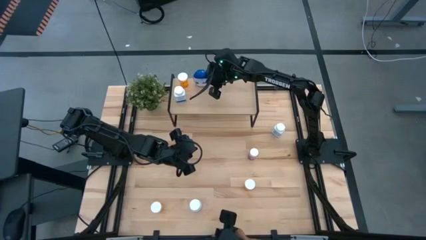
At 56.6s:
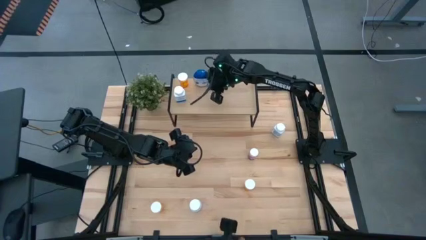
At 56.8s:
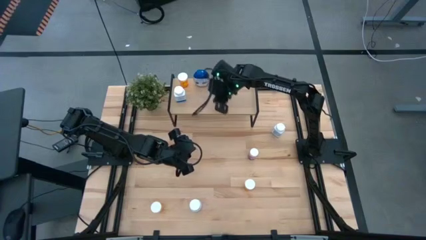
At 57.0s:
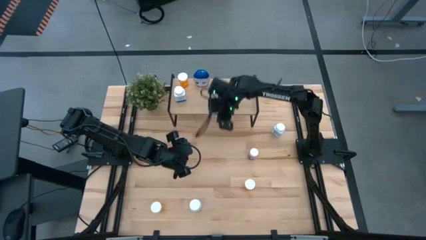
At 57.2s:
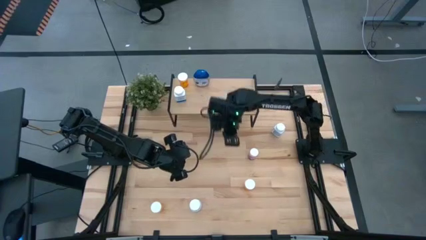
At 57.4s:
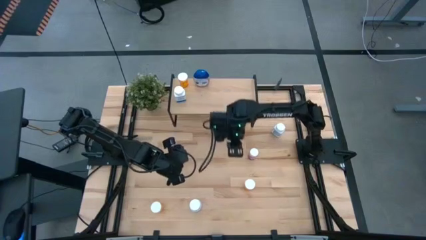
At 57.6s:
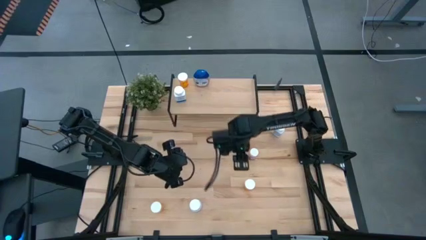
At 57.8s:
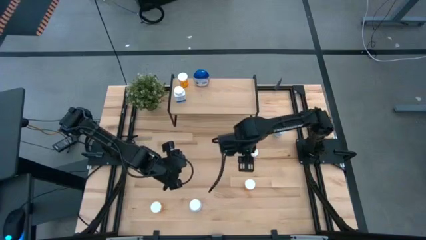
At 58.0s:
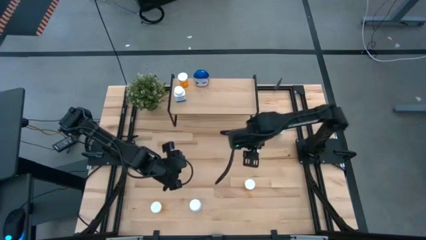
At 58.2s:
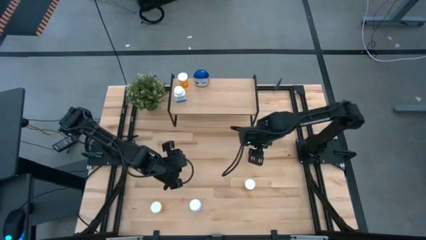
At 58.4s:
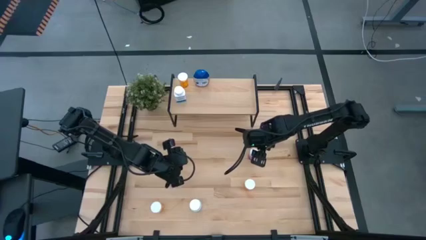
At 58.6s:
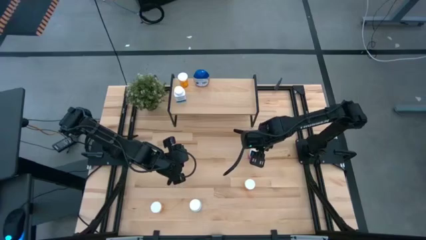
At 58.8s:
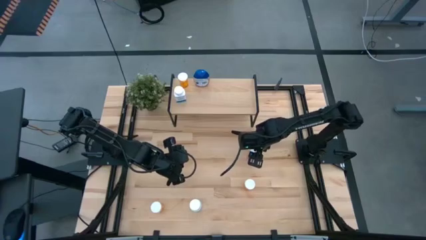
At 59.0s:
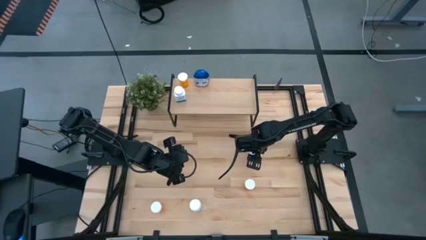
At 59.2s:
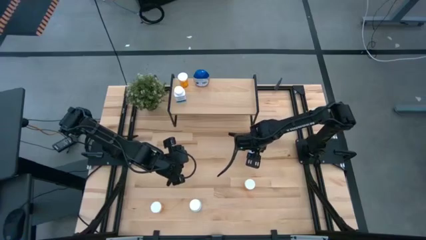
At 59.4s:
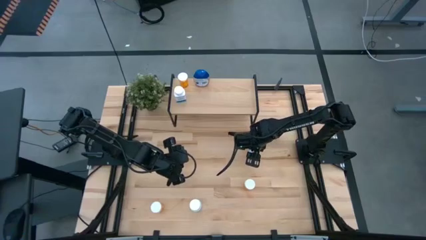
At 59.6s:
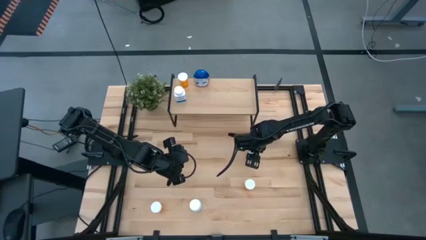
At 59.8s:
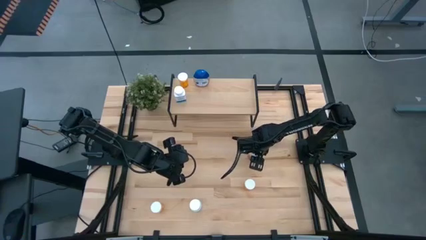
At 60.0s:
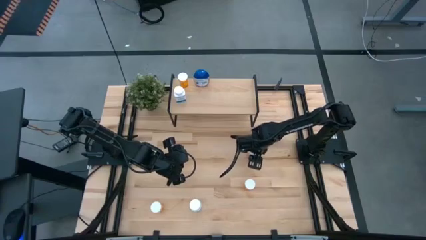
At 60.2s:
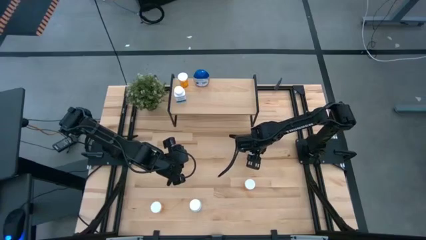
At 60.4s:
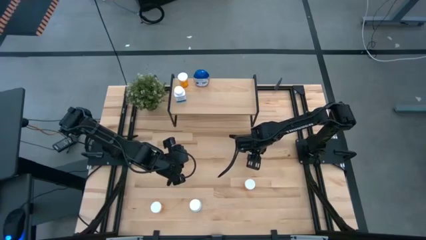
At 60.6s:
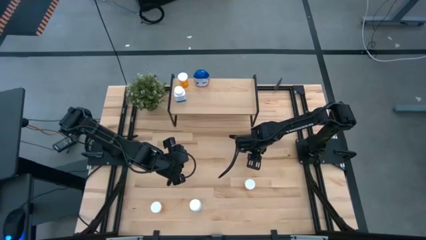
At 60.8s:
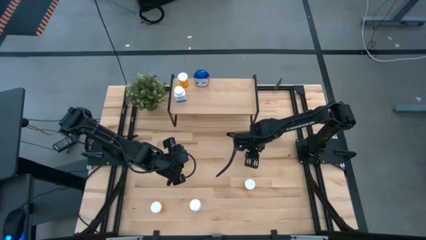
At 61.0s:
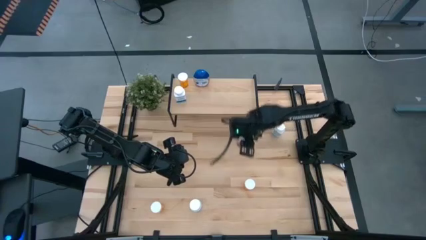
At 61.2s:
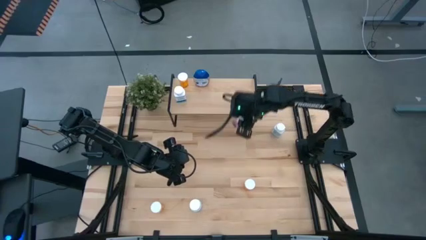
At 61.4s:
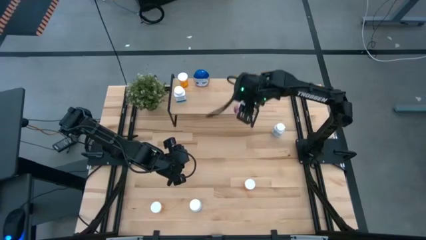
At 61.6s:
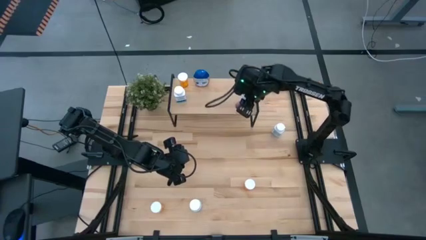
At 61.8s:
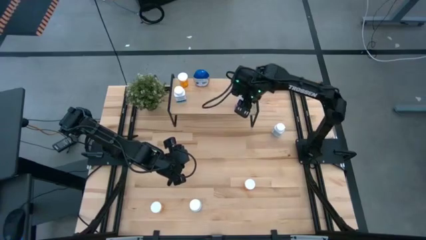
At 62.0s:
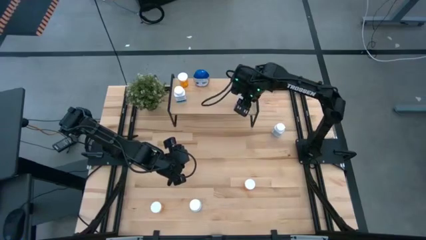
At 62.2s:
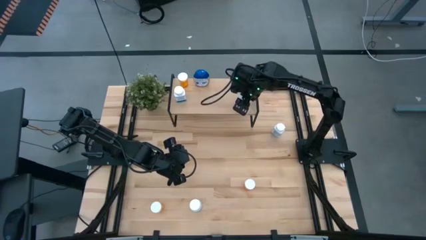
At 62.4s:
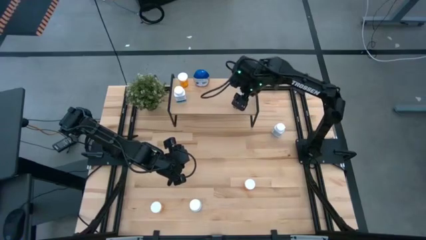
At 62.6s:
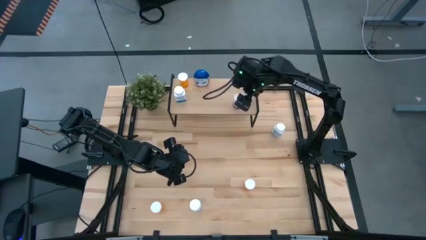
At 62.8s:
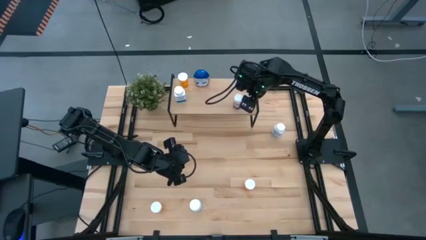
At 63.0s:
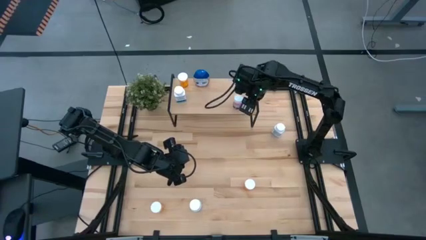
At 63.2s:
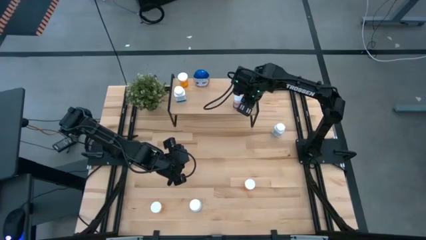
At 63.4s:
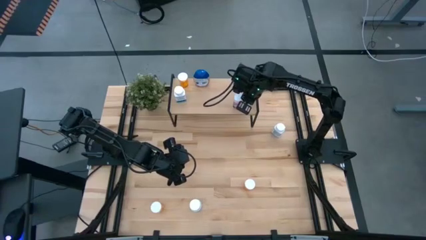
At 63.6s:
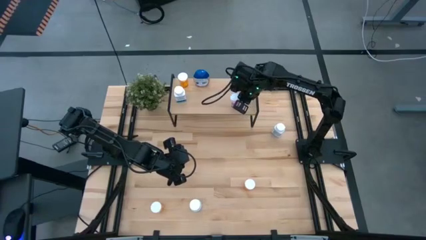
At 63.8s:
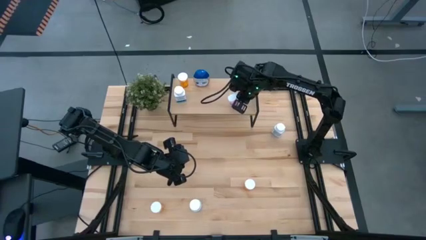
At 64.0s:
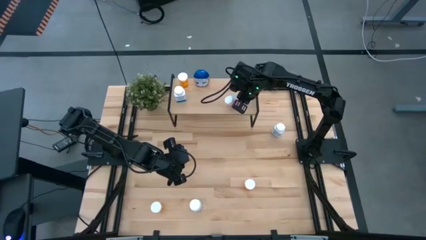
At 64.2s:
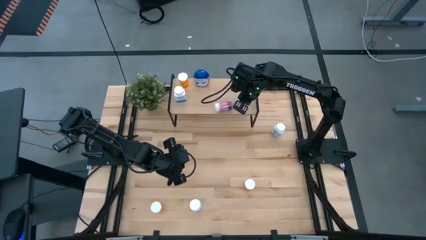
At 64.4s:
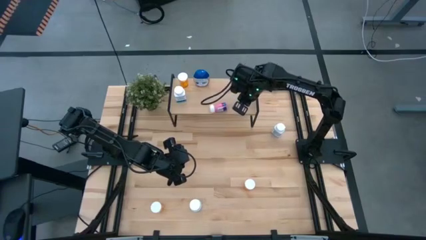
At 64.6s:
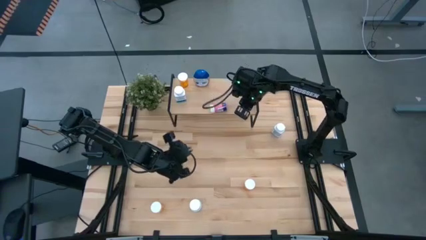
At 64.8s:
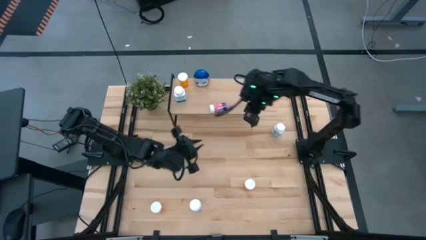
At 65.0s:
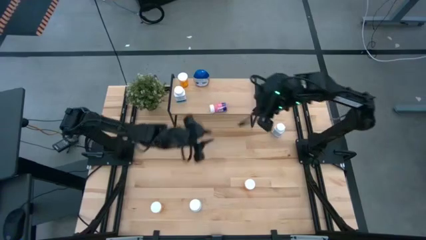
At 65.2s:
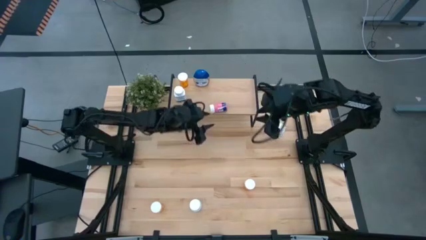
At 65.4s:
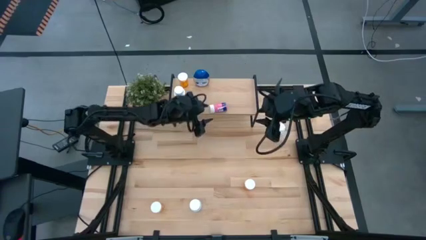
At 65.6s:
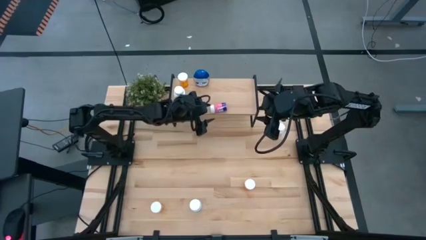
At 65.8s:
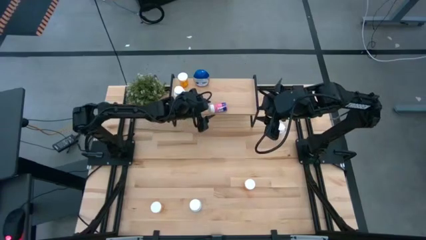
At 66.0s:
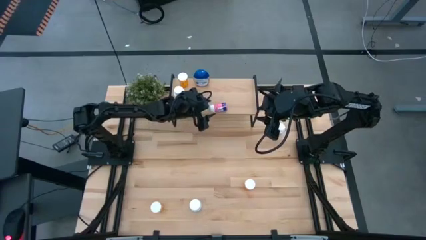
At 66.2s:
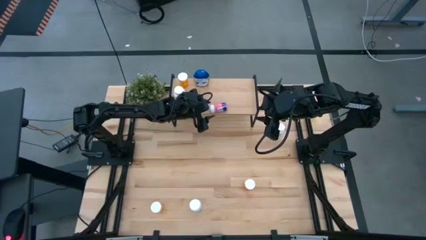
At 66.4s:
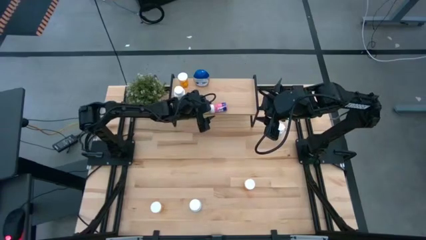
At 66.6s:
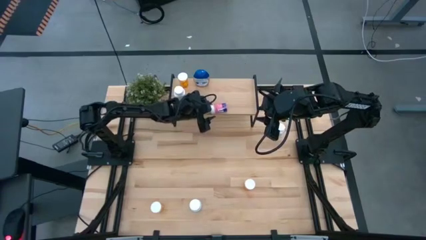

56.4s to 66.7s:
Task: Pick and place medicine bottles onto shelf by color
Put the pink bottle on the shelf

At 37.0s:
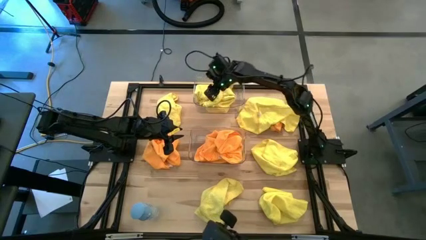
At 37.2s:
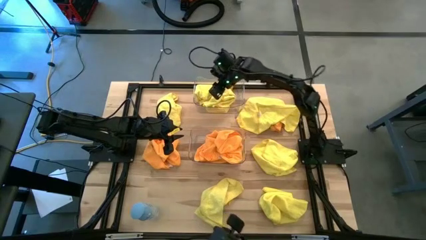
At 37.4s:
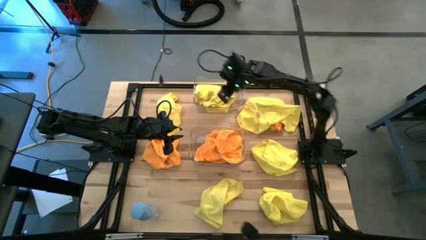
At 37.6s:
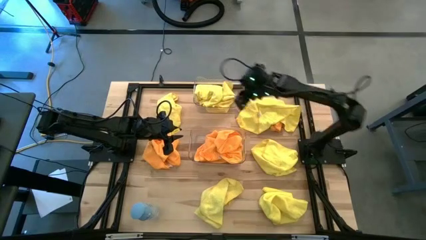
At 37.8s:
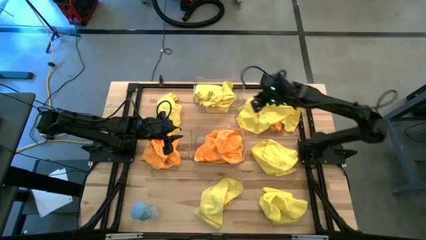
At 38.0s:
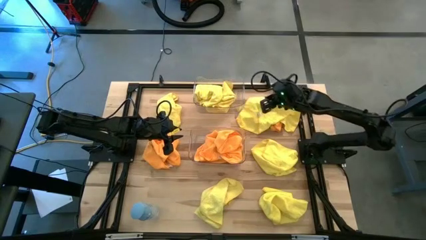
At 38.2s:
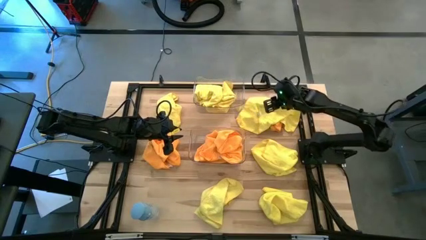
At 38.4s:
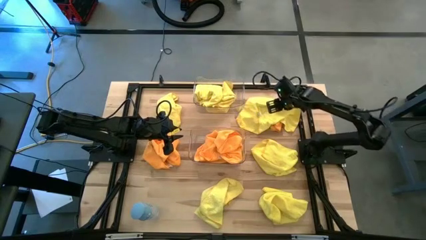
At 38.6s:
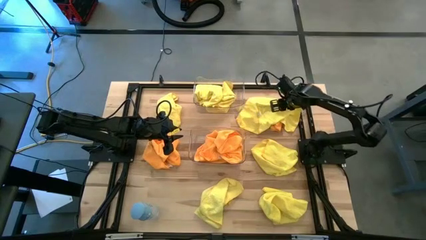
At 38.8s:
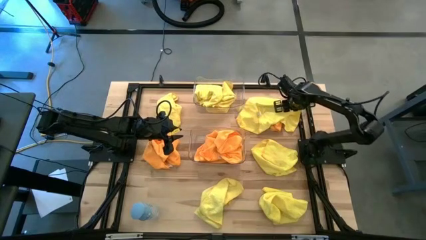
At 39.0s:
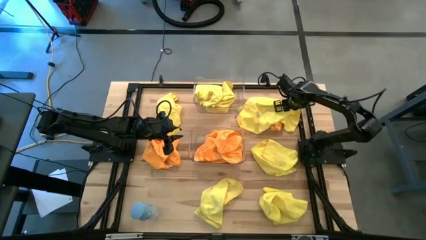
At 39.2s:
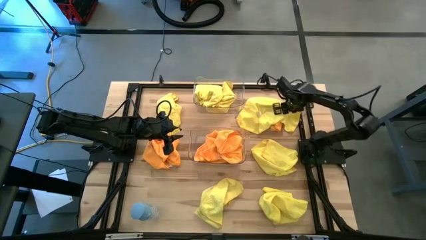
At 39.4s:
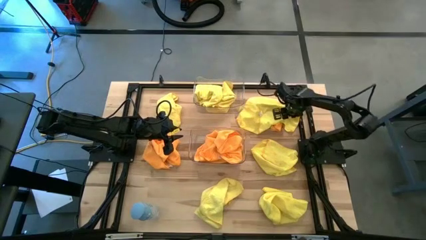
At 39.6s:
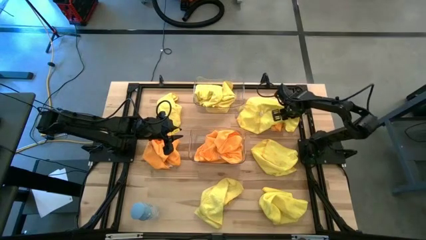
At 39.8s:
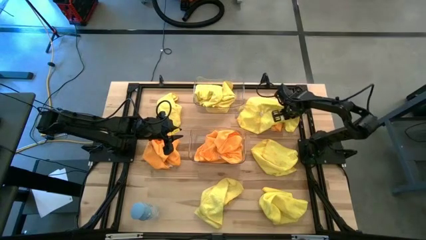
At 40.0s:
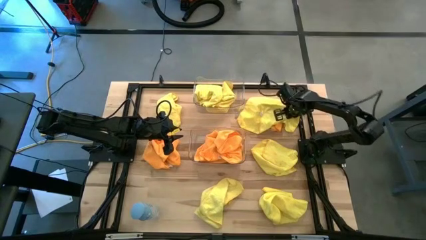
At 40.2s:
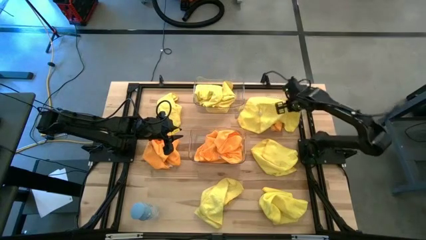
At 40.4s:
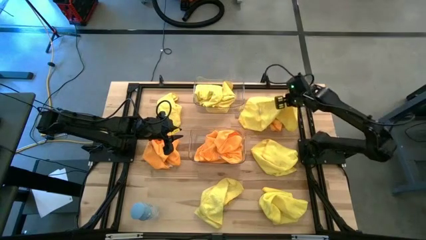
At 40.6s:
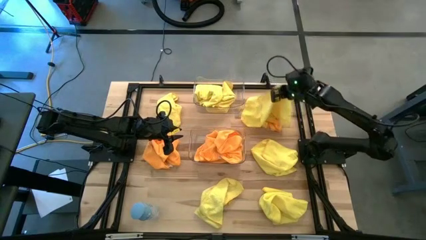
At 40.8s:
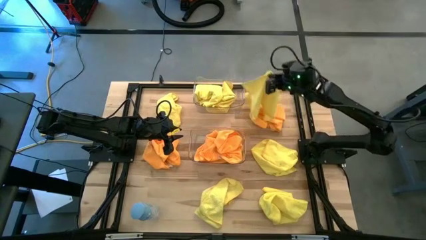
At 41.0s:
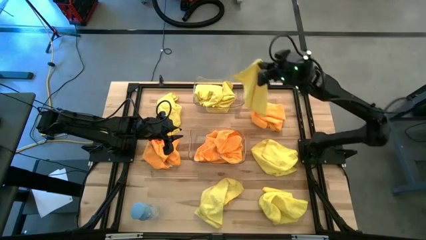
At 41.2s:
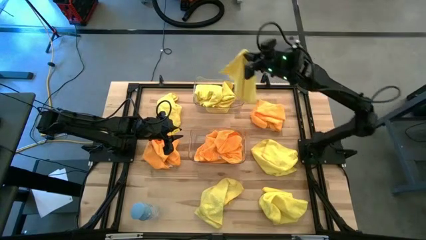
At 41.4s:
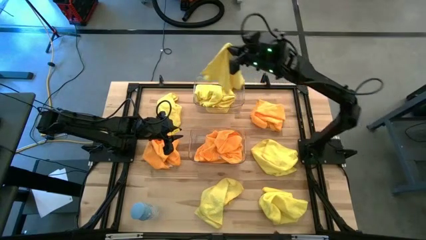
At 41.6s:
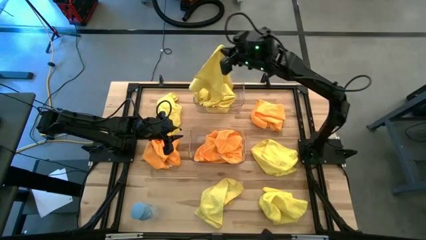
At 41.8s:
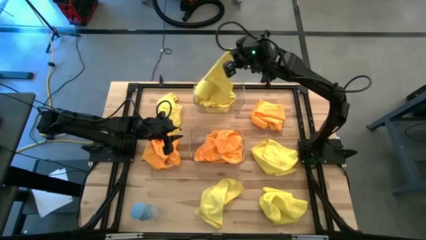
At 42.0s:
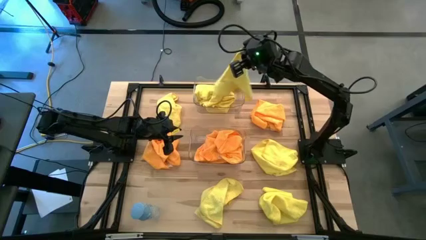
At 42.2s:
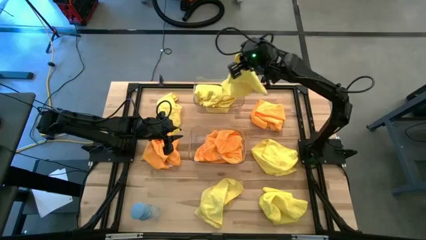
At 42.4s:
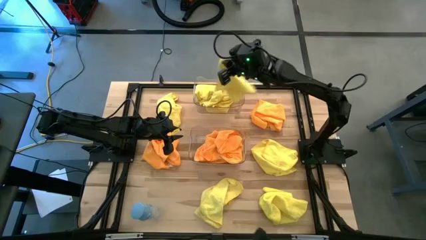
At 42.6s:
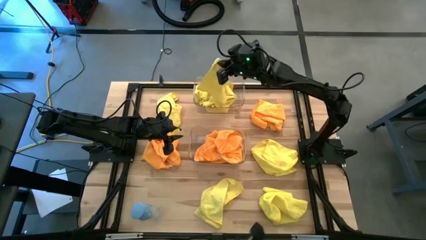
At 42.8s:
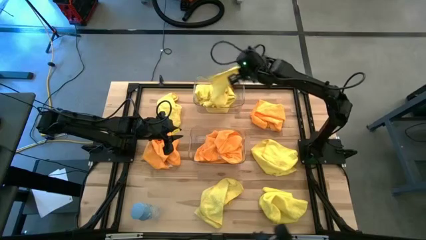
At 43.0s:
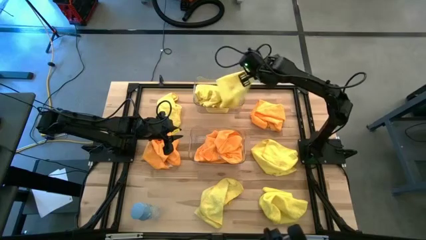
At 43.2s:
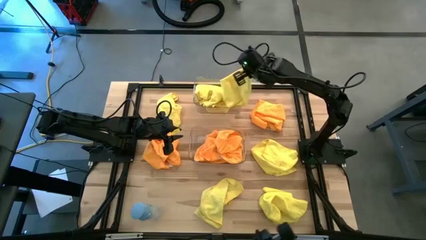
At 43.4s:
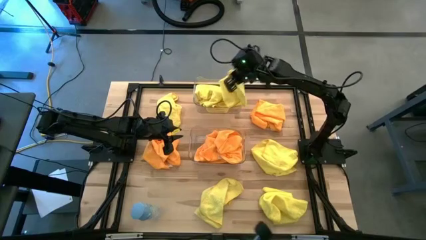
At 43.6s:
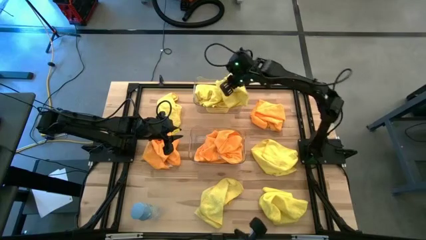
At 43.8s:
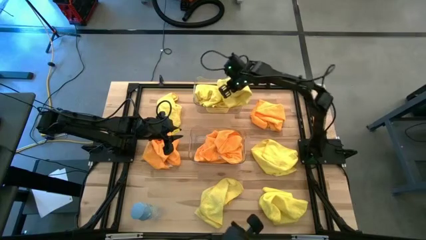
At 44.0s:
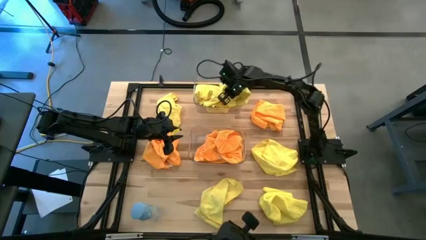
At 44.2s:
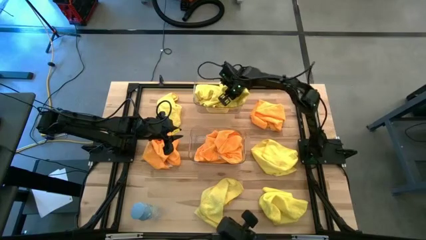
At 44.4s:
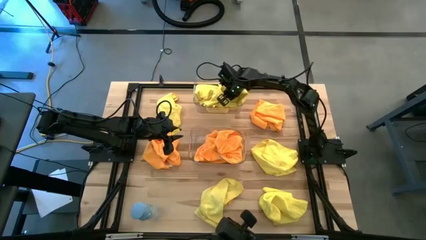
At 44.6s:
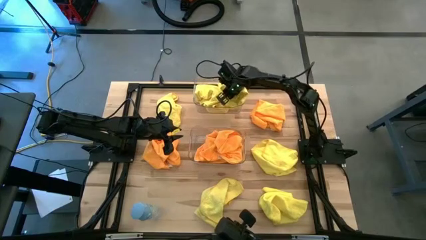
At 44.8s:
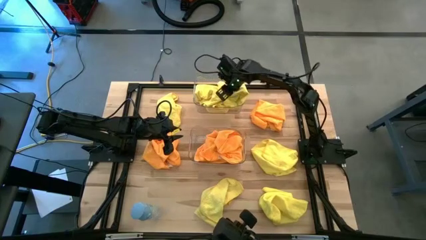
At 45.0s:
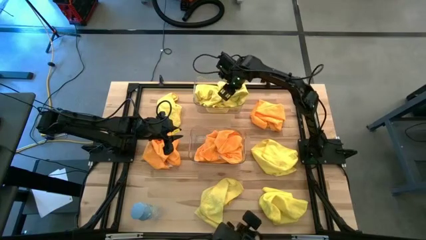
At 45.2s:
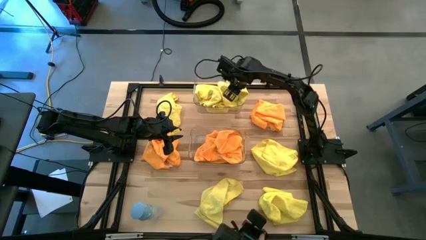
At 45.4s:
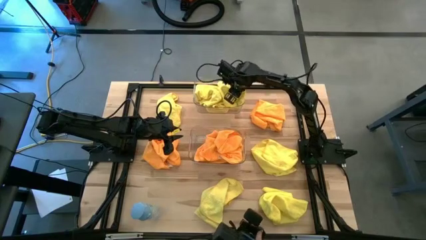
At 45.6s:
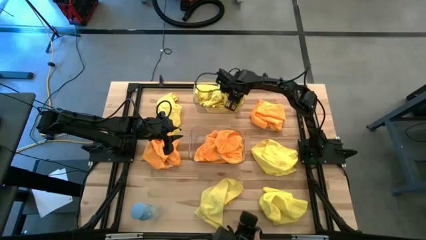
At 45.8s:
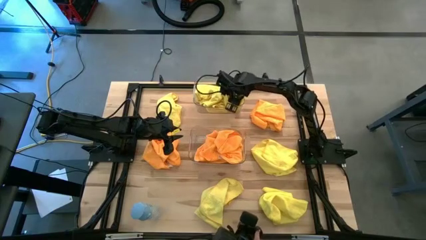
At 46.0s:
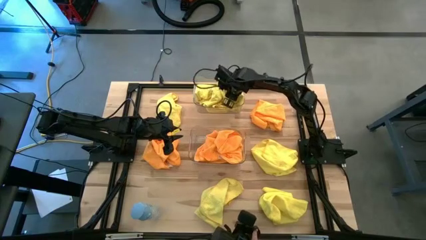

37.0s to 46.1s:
Task: Sort microfiber towel by color & place in baskets
Put the yellow microfiber towel into the top transparent bin
